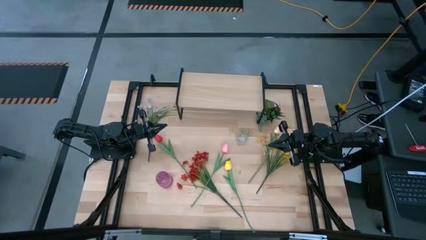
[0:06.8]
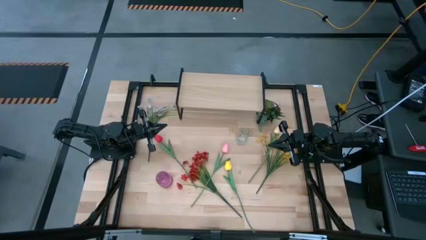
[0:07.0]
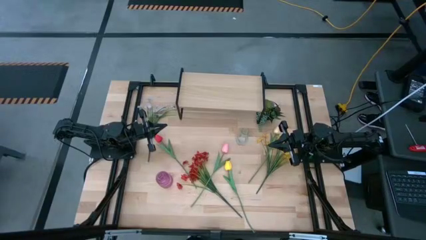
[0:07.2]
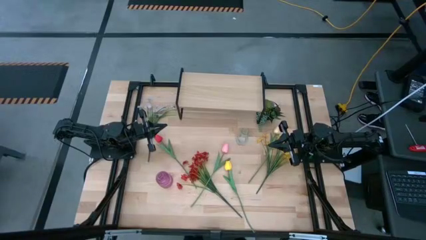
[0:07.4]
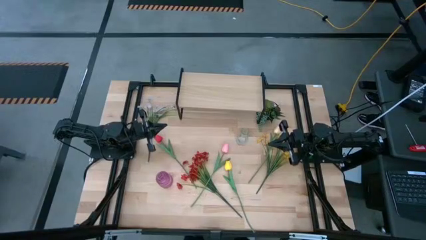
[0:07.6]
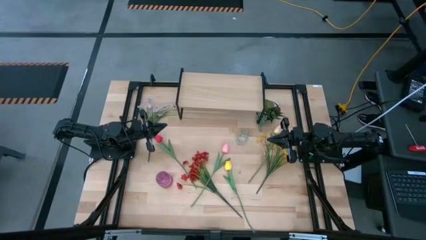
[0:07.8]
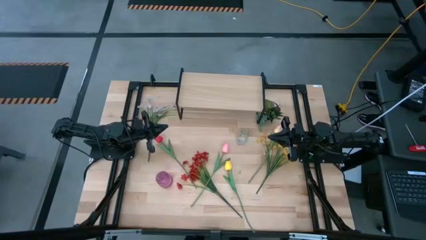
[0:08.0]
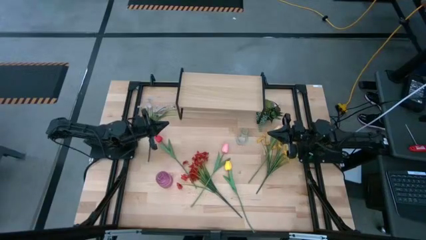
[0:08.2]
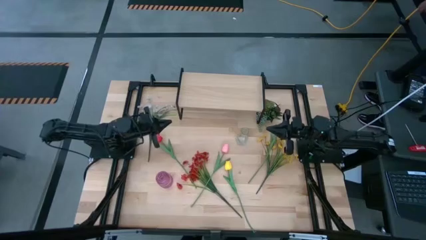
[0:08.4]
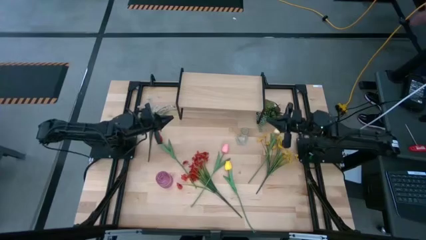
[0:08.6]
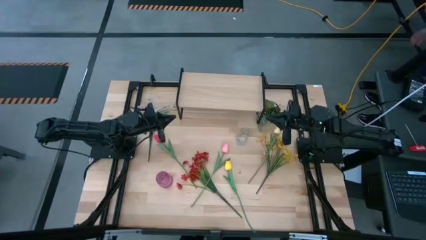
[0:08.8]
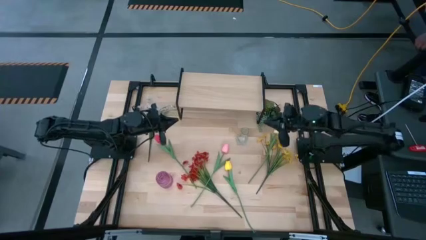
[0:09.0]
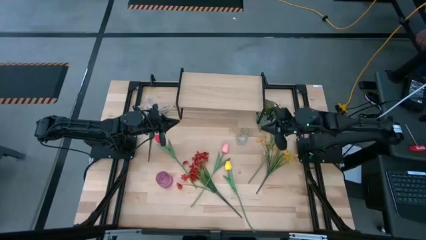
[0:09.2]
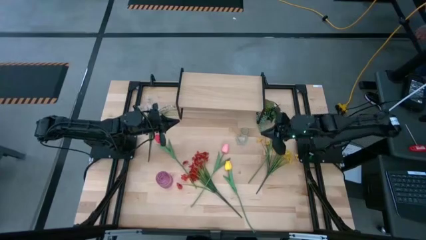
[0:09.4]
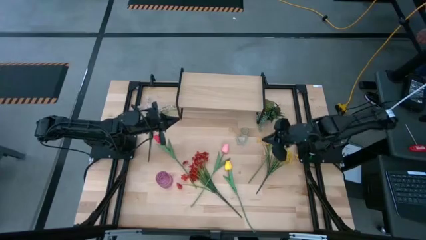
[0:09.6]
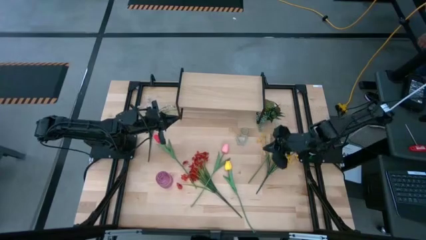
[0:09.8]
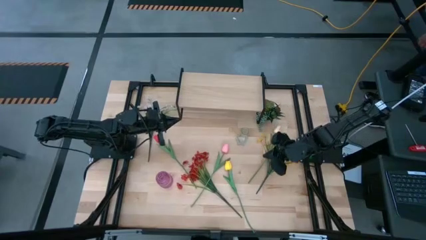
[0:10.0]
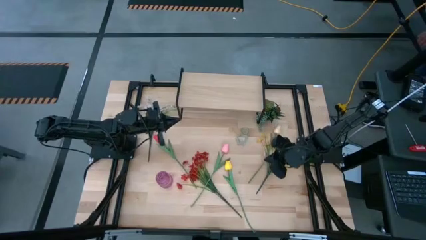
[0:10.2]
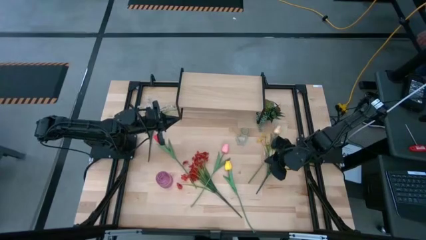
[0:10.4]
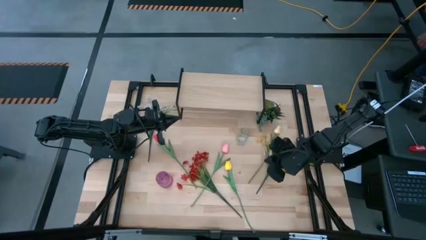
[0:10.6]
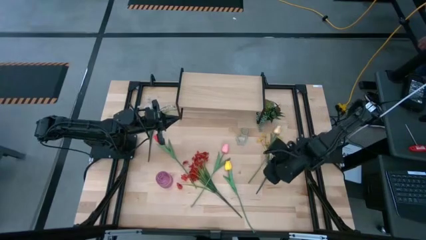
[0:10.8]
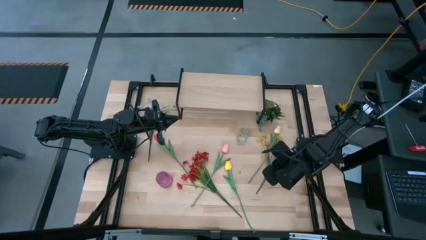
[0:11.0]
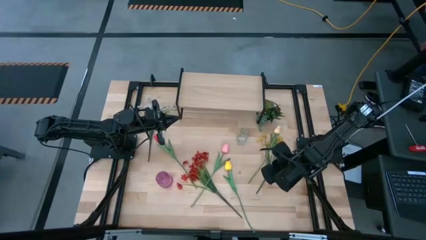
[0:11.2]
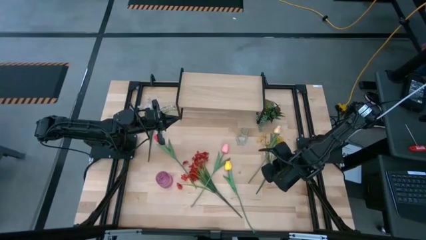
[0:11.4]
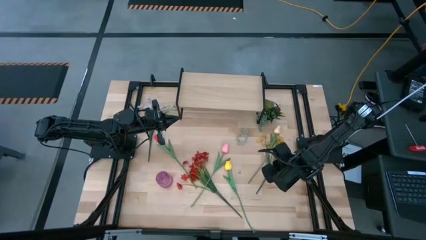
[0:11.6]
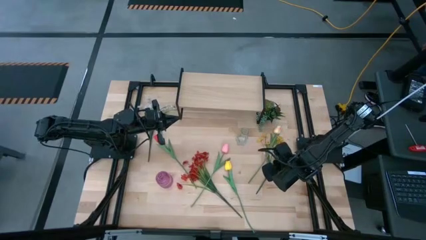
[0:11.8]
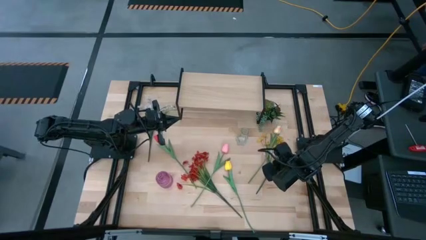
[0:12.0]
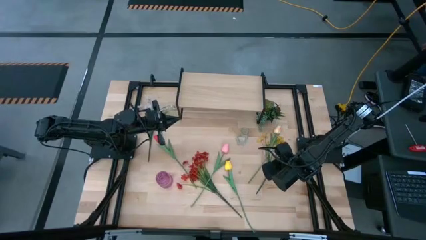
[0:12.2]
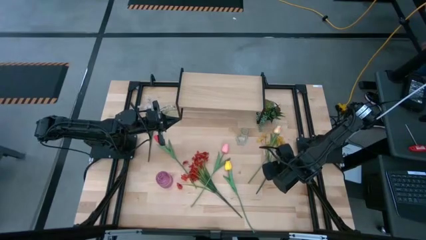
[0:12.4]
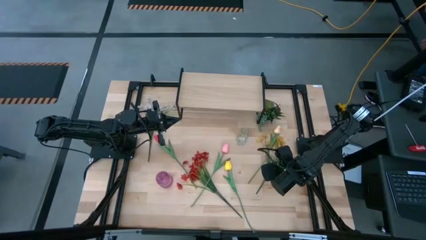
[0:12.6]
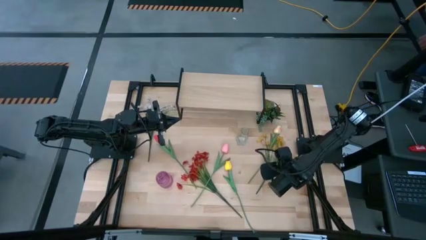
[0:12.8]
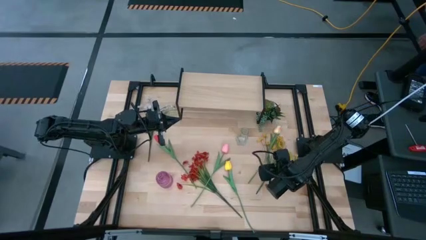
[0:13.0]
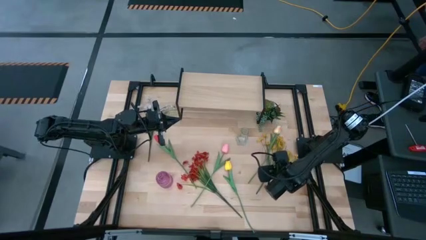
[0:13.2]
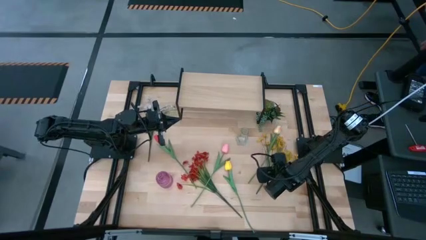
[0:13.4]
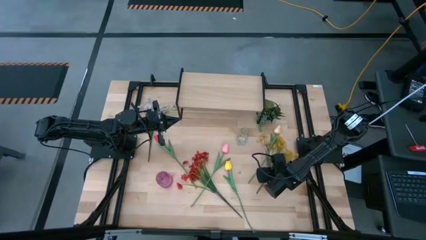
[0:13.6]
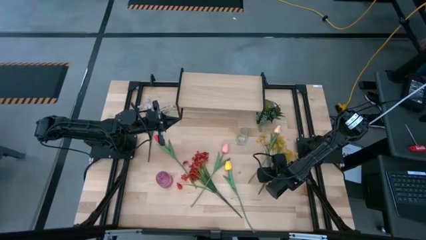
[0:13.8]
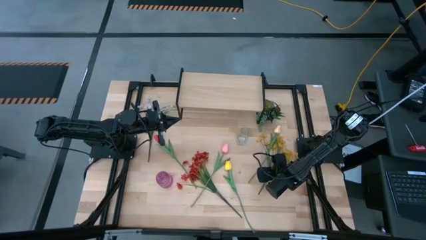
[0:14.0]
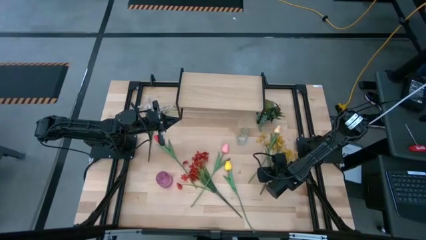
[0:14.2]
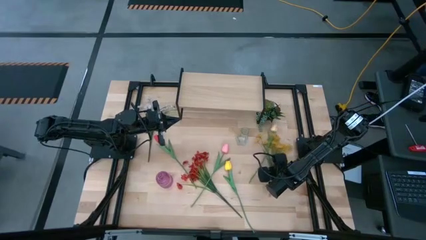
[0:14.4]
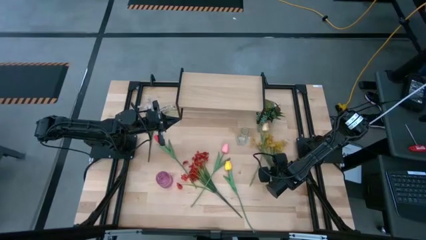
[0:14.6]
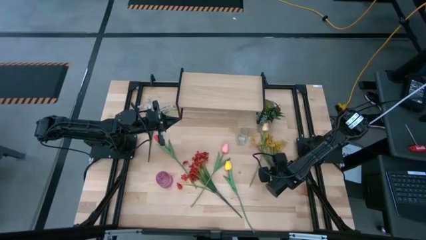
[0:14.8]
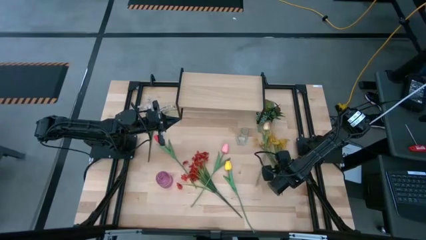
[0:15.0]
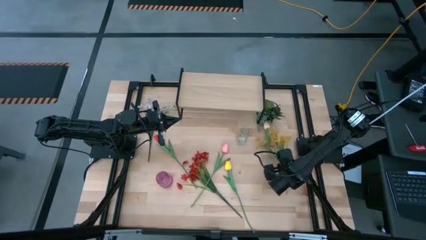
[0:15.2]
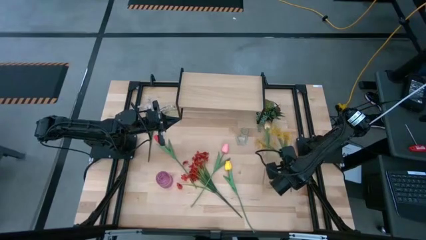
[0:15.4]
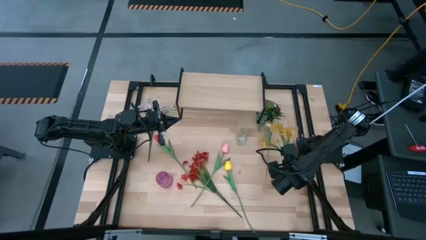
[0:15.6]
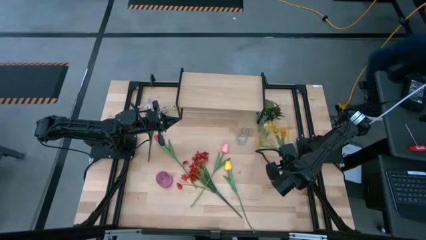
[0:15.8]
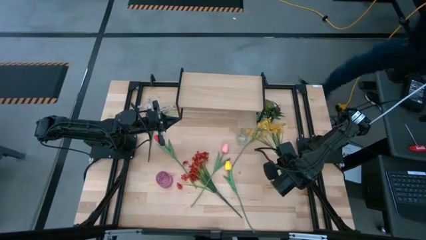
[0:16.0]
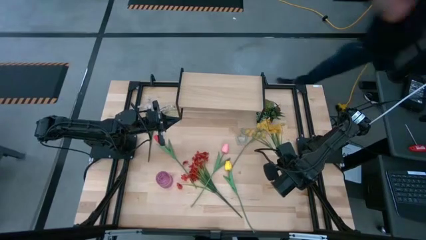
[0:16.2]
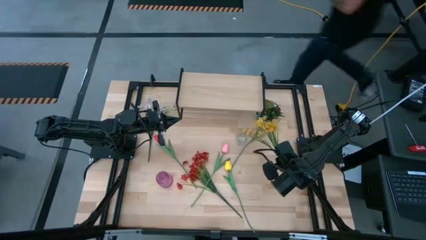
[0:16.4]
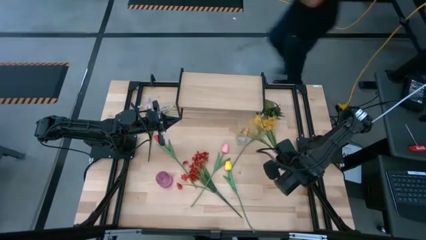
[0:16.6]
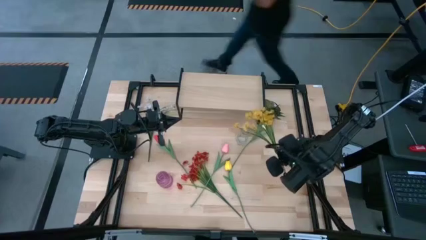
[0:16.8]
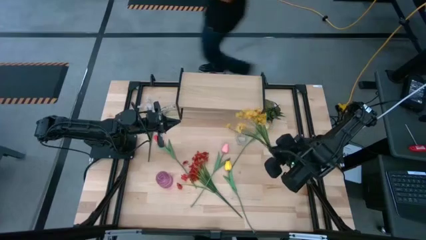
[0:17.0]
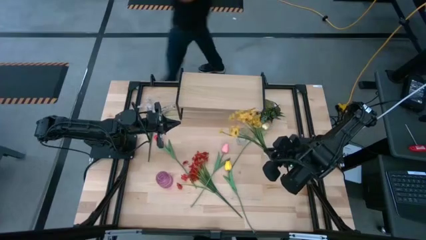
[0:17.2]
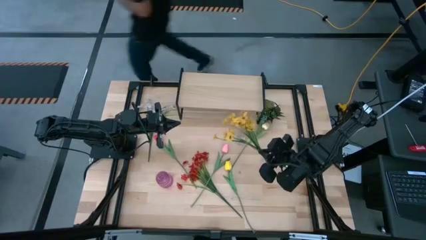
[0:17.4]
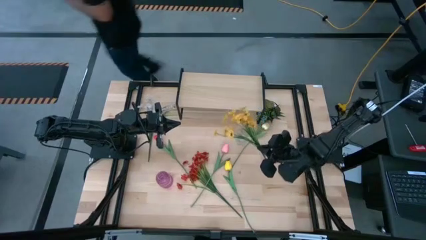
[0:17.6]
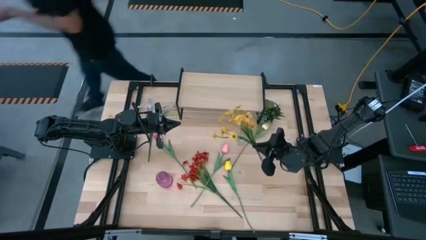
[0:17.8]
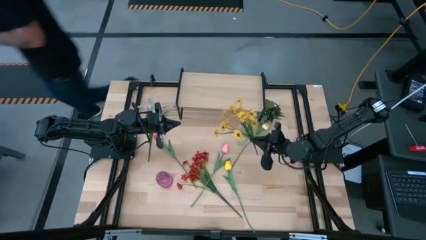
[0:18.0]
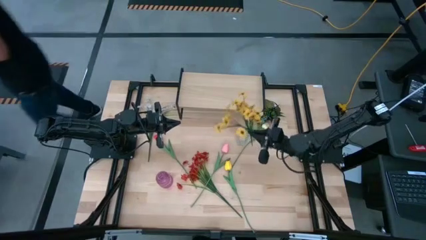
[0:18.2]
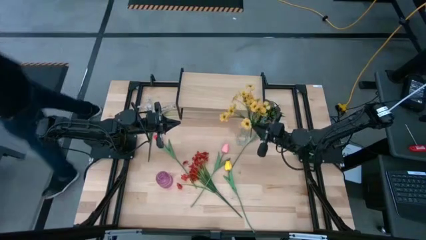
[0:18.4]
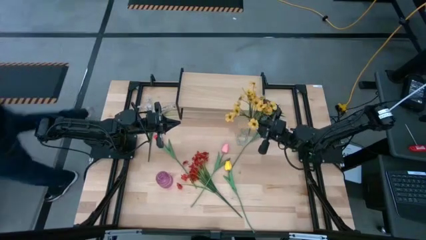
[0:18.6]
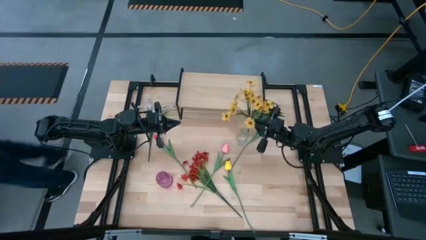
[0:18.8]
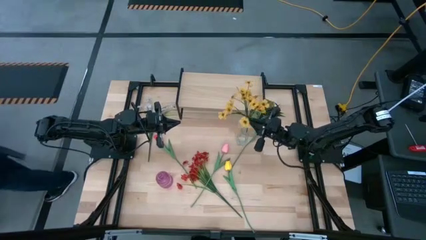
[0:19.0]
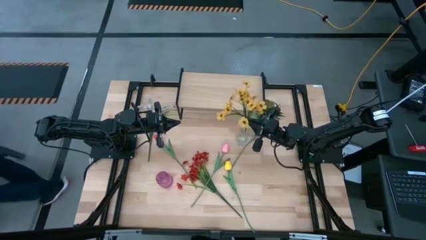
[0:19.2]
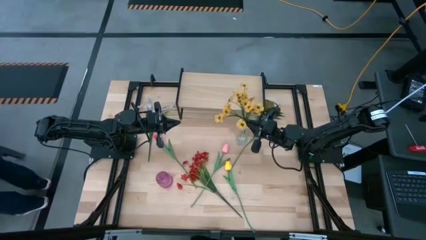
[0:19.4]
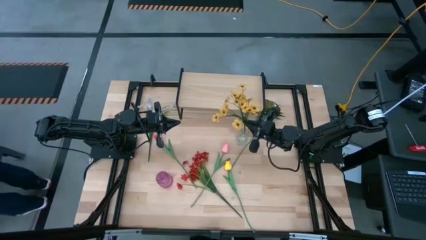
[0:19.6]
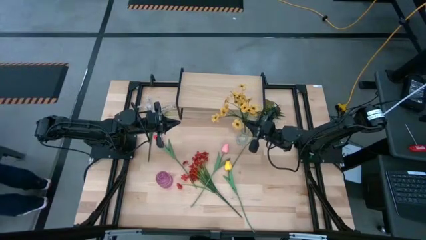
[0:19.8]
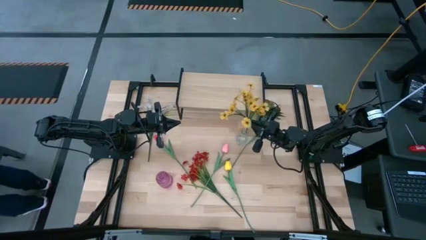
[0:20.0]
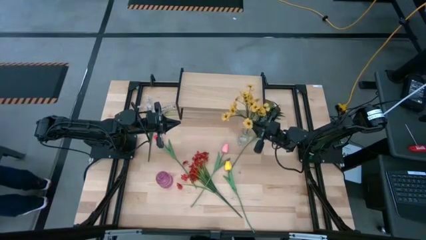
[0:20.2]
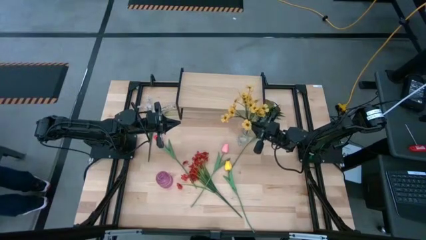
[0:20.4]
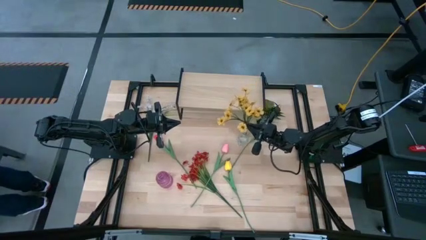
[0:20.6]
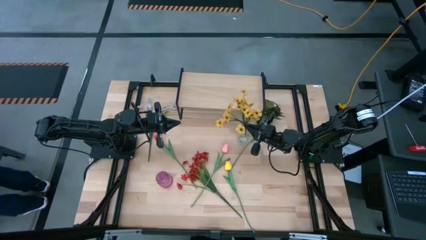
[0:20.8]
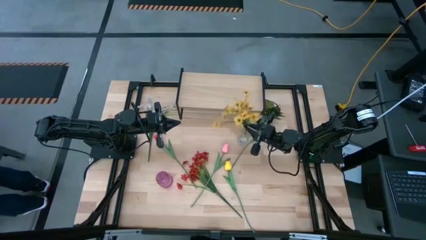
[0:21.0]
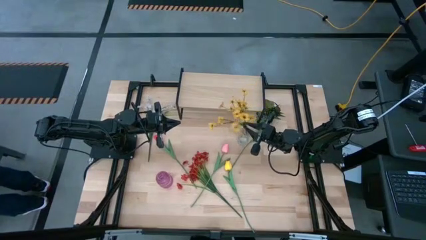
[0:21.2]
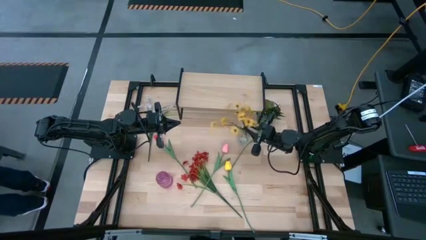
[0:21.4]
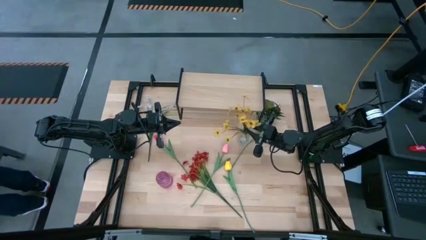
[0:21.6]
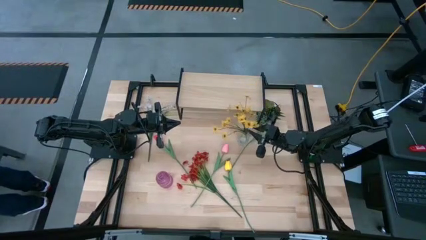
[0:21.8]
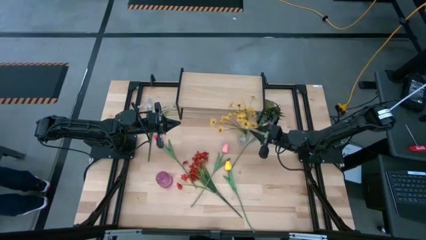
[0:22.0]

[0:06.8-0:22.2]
Task: Pick and place flowers into a vace then onto a shelf
Put the yellow flowers into the transparent vase
